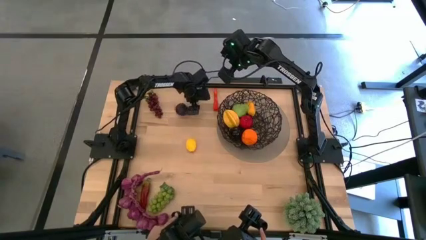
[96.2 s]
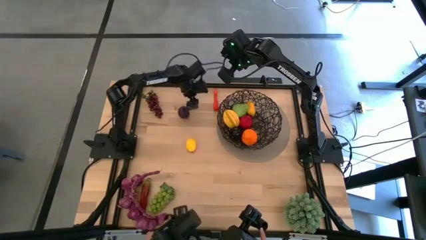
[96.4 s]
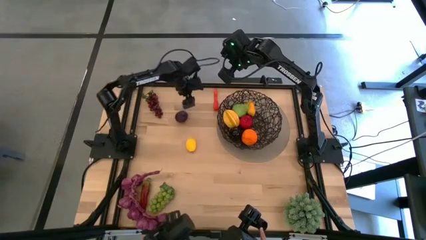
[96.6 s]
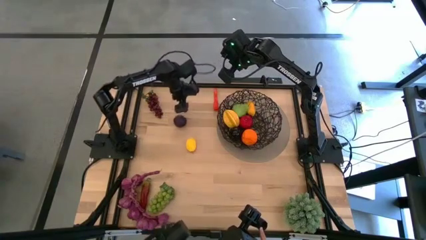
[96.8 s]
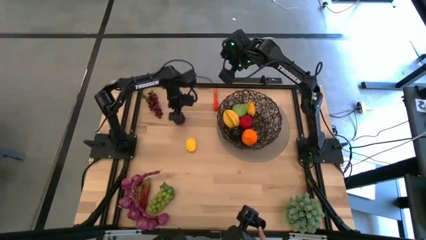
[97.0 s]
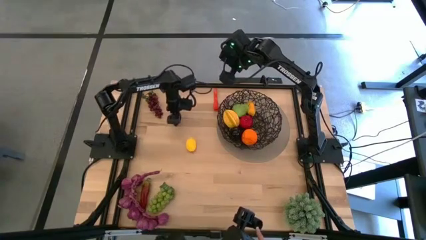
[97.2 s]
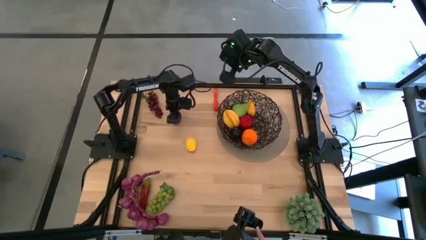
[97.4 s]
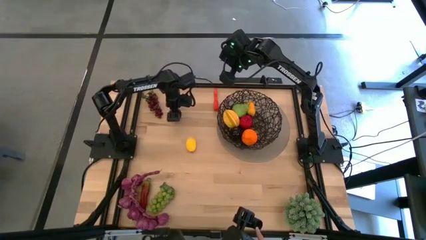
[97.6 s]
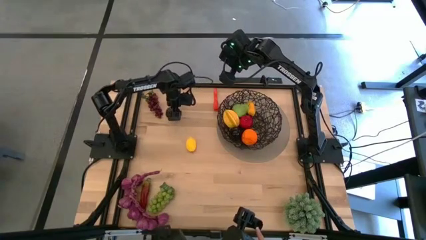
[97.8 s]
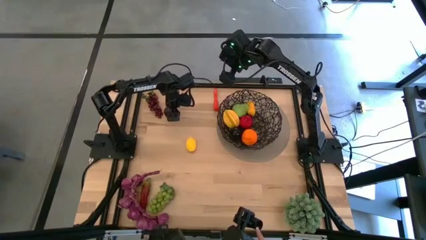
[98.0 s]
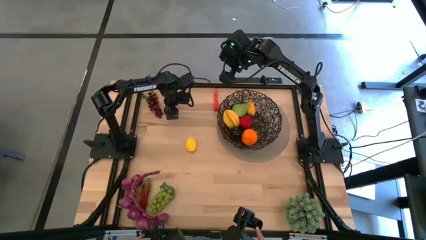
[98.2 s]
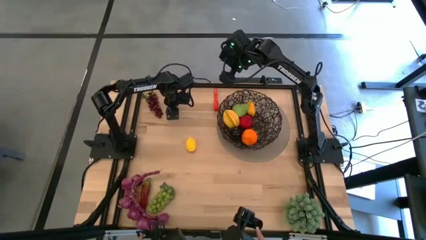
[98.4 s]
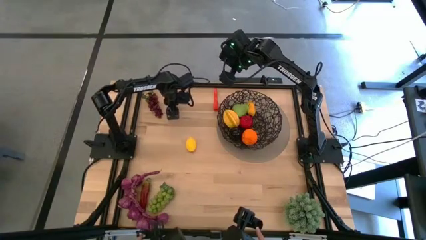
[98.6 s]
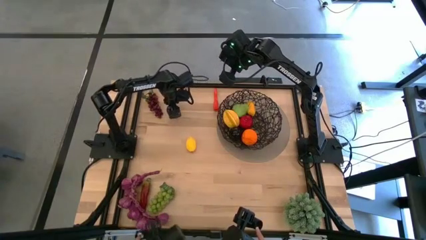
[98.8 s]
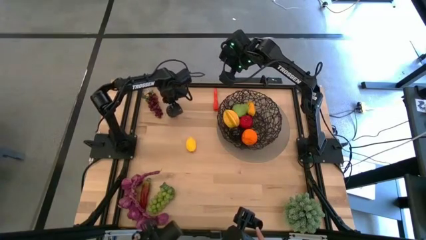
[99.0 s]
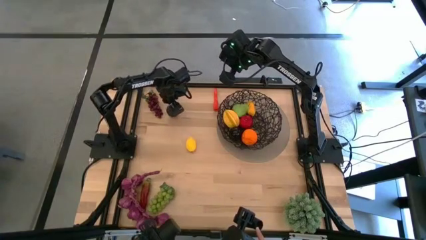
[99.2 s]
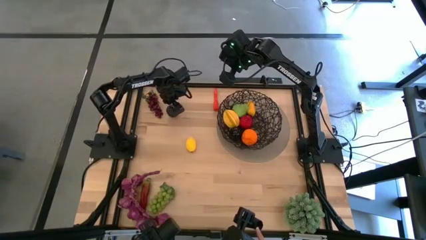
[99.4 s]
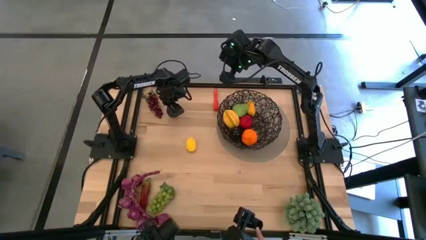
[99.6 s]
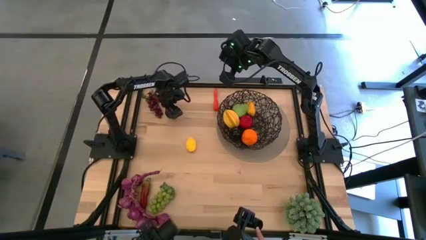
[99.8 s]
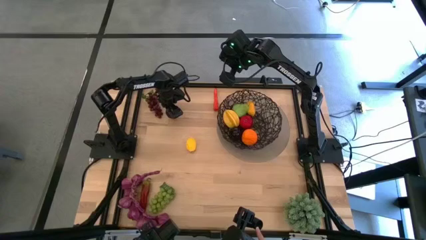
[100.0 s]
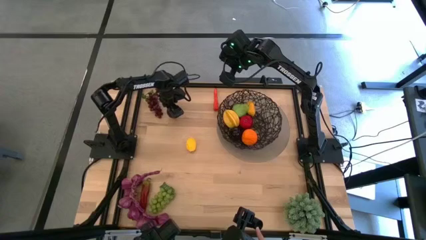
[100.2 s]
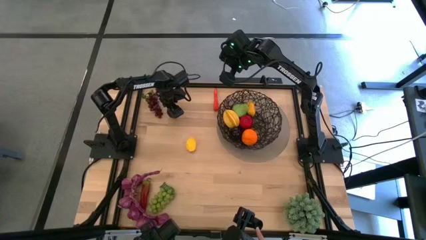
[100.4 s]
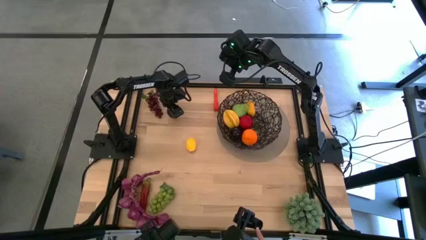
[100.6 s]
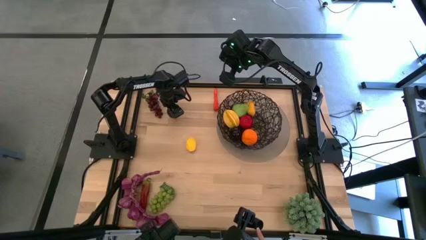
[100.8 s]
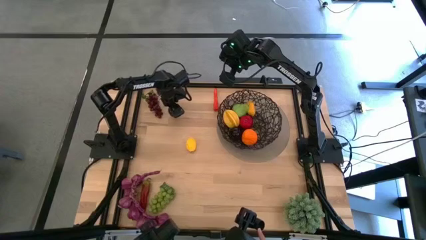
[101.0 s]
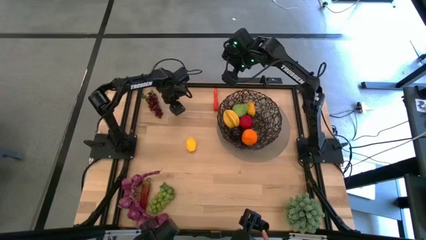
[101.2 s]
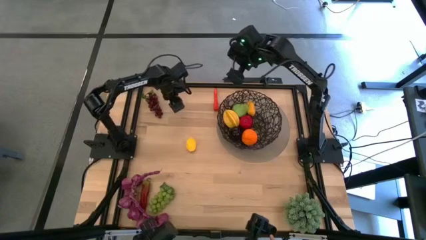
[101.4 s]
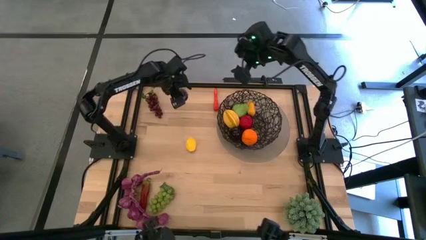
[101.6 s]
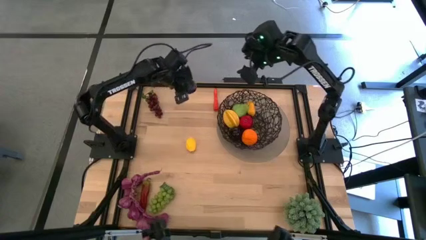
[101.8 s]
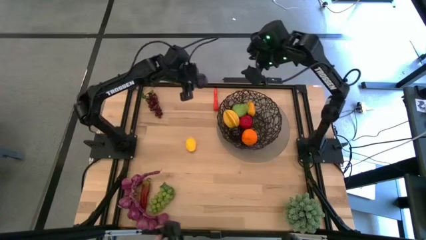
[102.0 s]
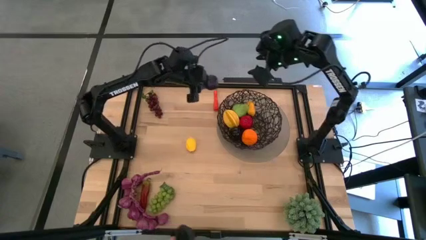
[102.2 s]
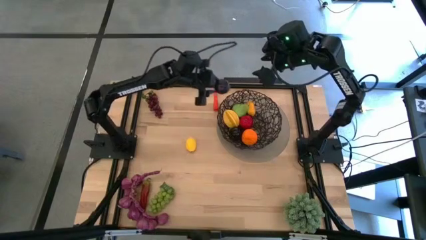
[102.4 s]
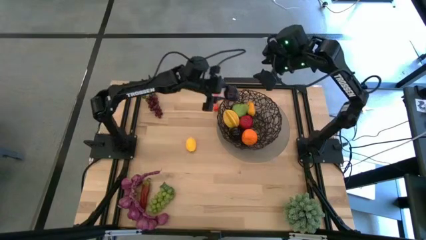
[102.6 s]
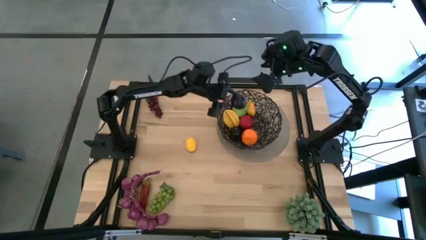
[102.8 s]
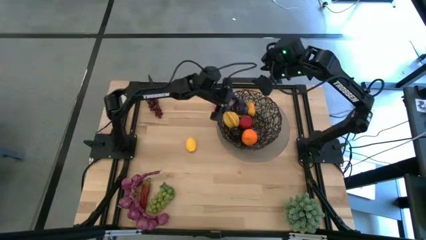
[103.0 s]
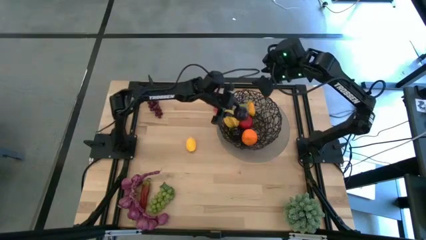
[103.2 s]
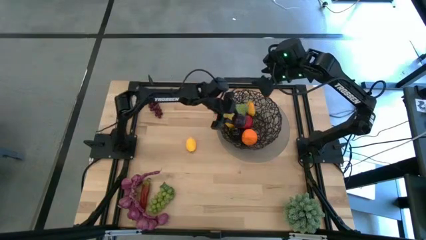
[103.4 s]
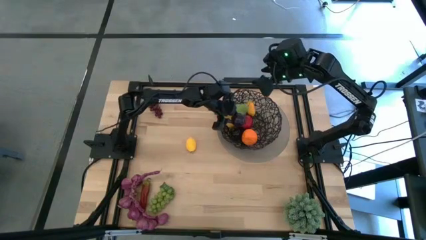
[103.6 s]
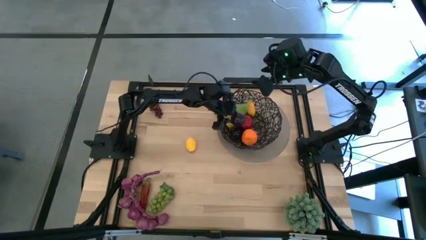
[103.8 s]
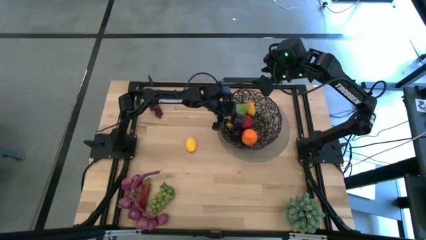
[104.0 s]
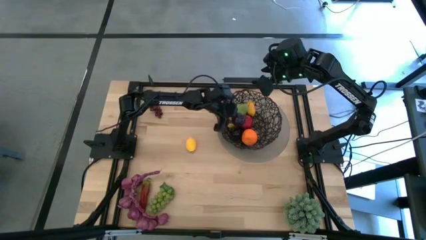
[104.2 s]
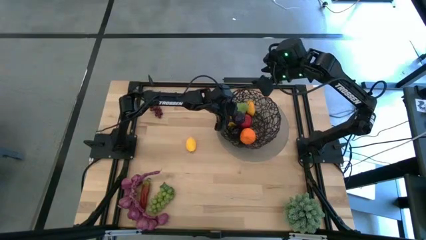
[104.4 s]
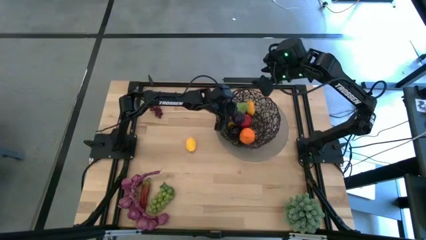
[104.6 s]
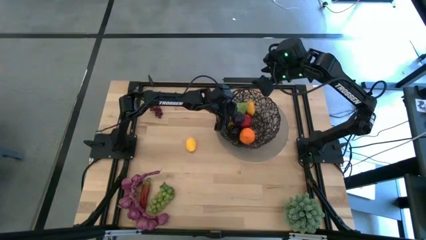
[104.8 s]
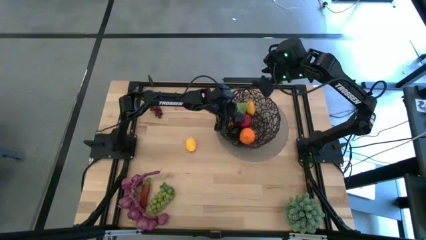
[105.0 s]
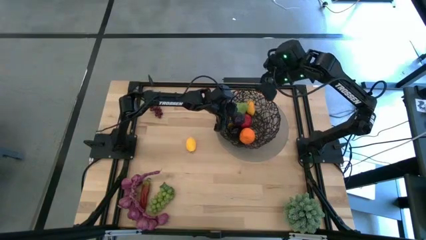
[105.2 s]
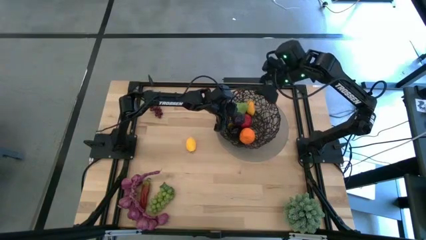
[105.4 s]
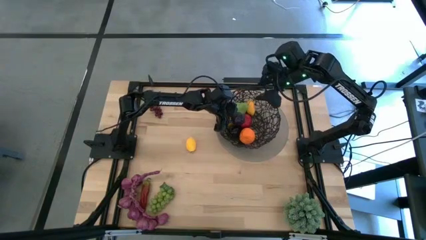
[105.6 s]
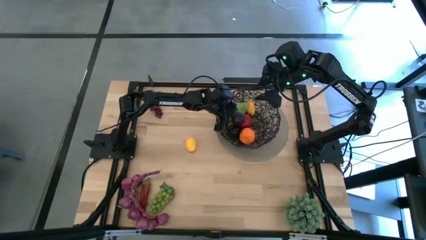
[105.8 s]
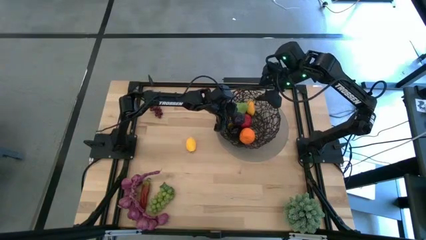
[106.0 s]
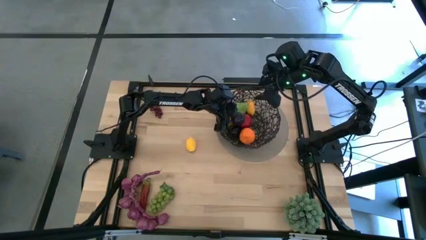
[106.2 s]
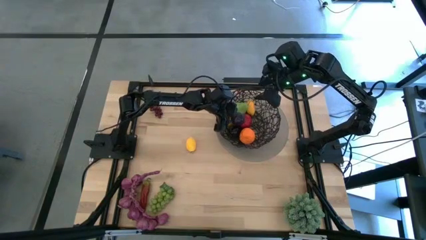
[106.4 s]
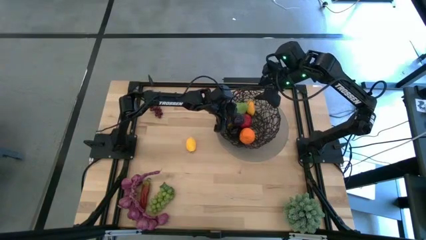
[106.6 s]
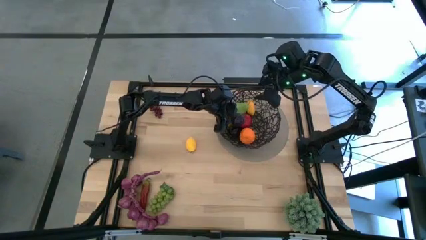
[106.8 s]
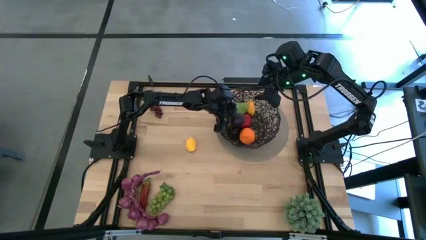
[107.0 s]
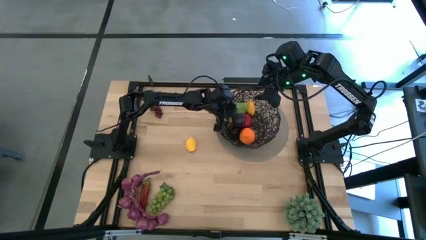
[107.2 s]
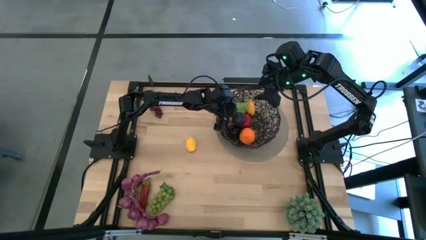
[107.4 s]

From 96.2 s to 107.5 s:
Task: Build produce basket
Put the plum into the black wire basket

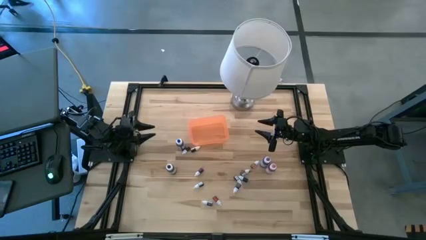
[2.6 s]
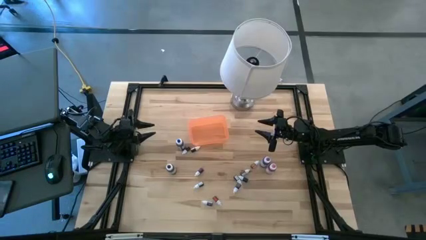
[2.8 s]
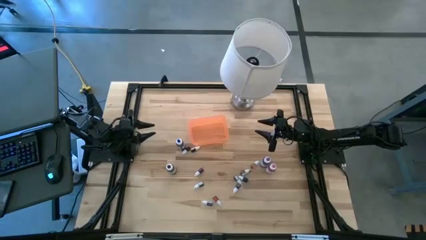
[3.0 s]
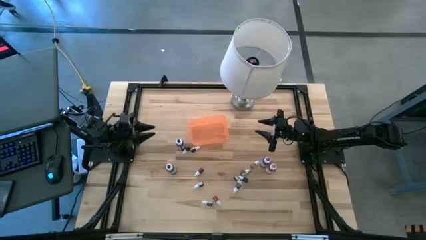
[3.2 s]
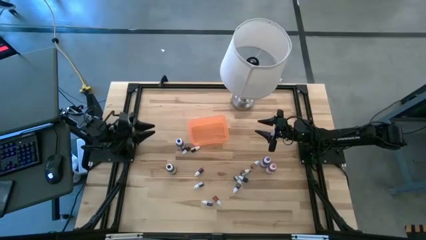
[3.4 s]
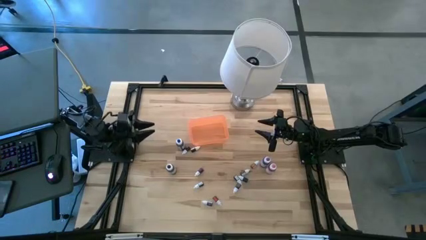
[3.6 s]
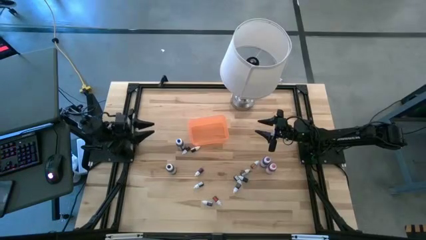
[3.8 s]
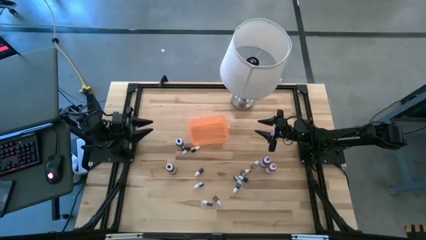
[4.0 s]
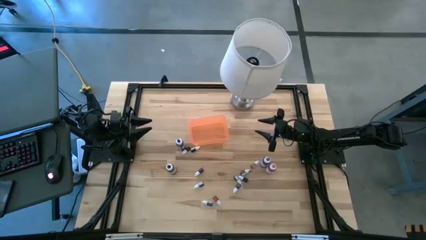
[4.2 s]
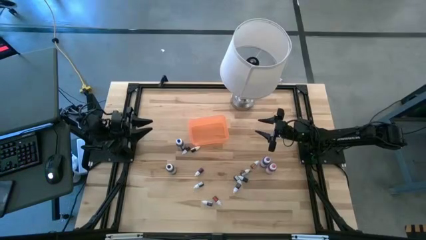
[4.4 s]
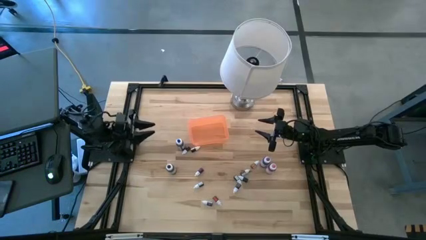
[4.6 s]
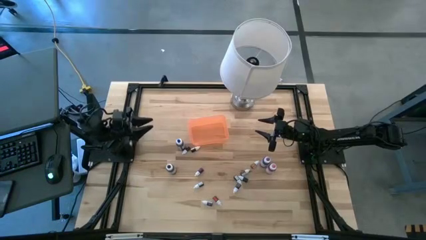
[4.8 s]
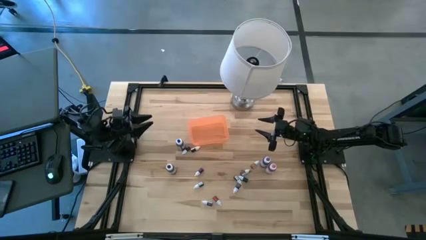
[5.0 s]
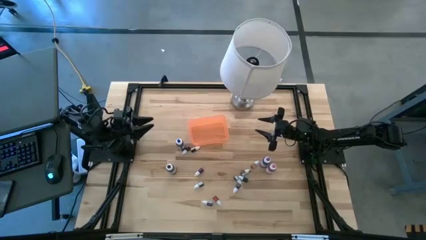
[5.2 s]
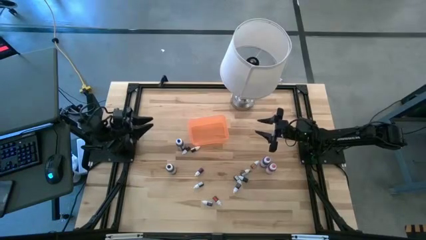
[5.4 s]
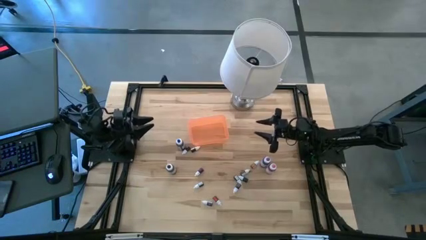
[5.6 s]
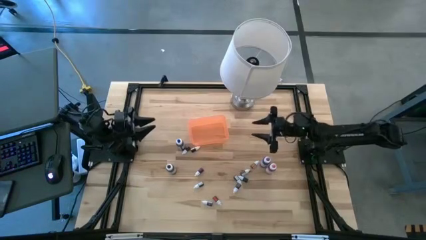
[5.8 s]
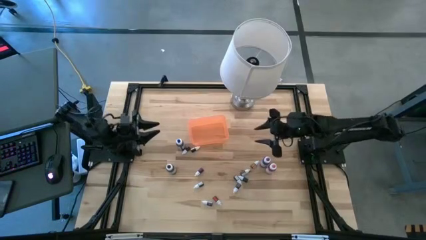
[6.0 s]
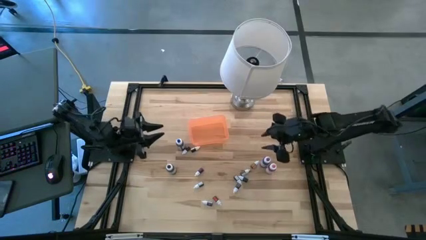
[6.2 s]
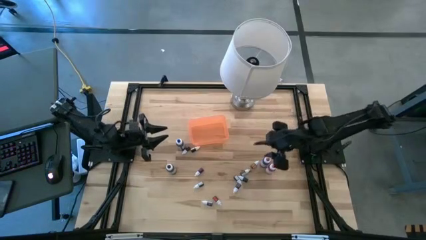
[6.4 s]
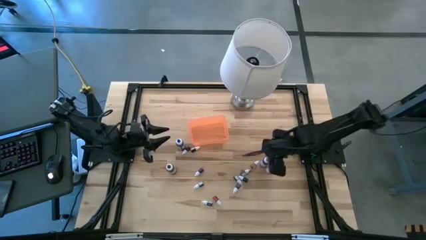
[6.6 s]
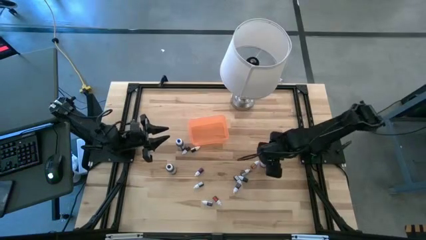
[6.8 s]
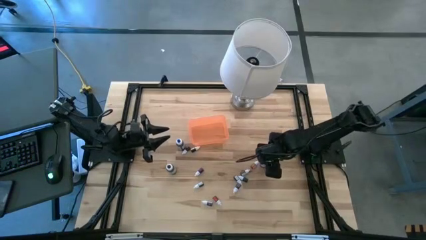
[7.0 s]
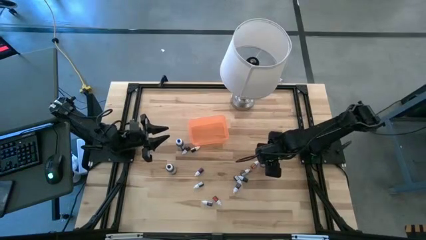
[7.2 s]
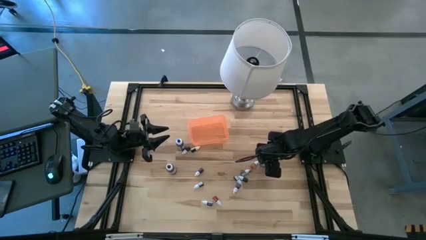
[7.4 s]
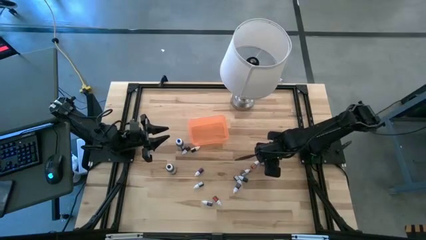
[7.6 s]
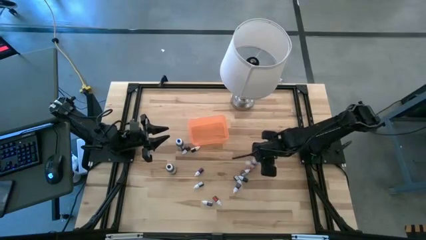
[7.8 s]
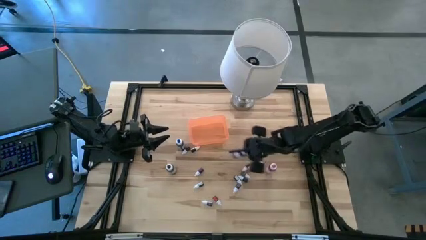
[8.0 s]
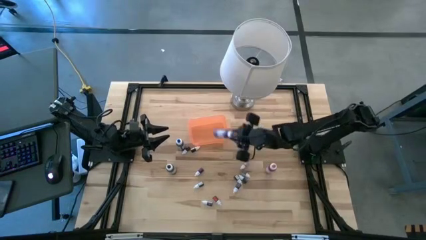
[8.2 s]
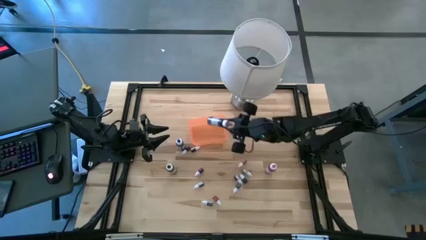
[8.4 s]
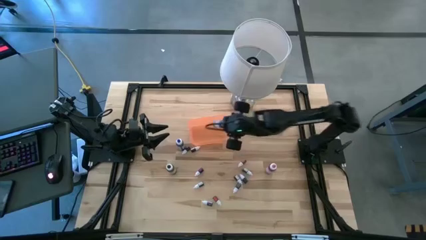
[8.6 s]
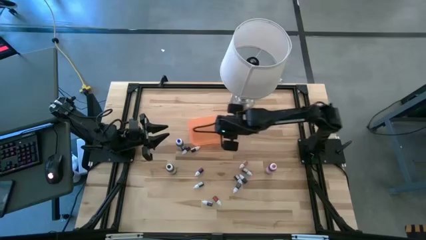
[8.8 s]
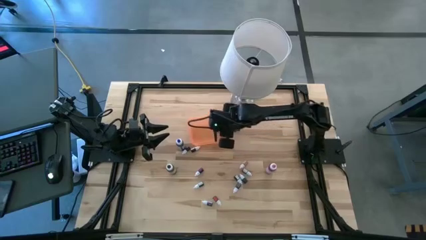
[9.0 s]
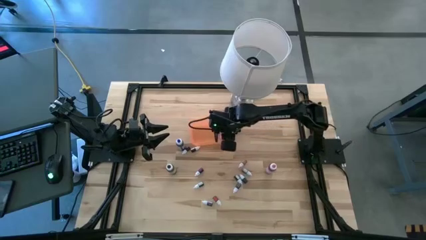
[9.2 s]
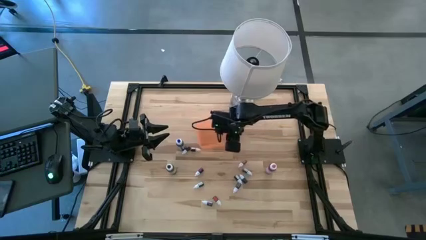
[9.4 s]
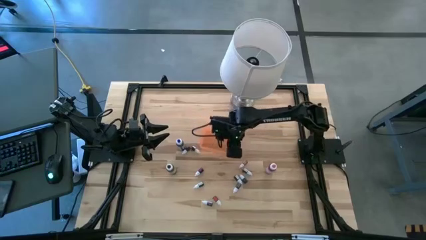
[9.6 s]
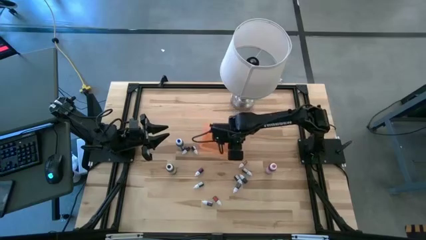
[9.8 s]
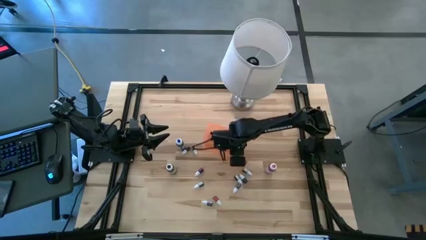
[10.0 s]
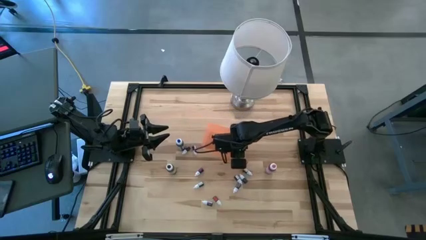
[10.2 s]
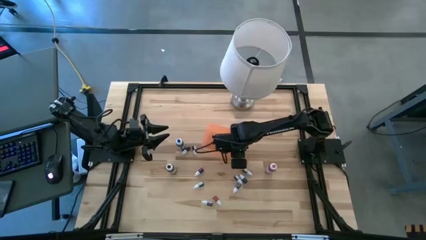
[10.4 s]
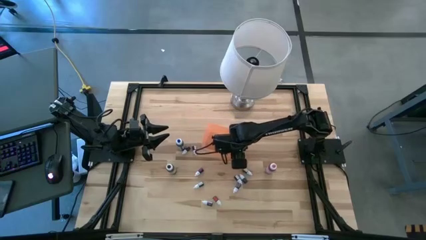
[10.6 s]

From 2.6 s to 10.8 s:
Task: Pick & Place food coloring
Put the large purple food coloring bottle into the orange bin
